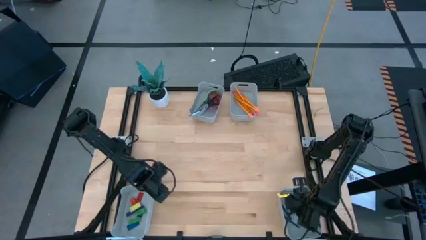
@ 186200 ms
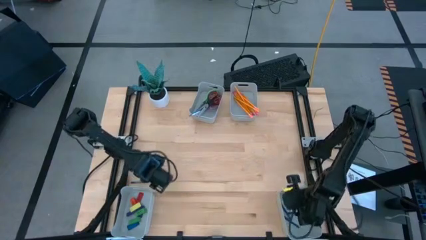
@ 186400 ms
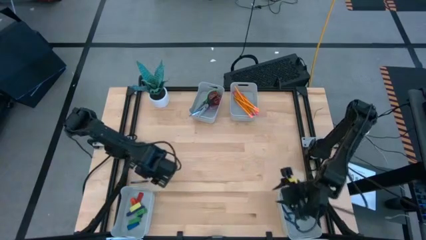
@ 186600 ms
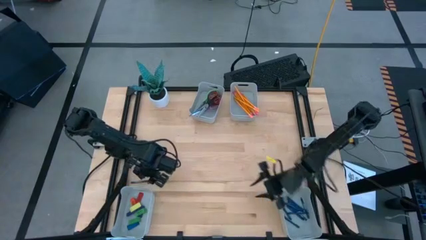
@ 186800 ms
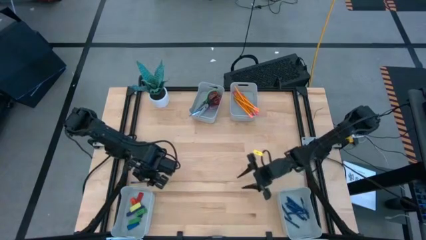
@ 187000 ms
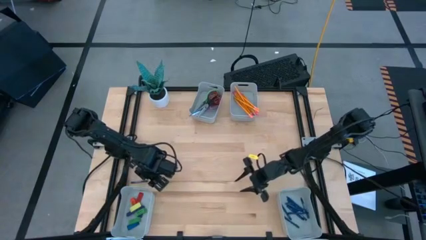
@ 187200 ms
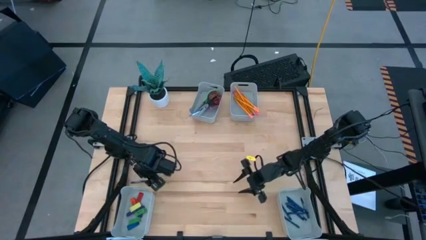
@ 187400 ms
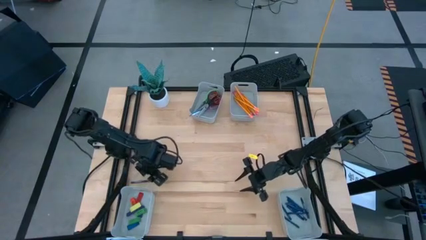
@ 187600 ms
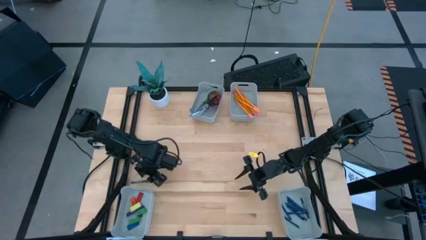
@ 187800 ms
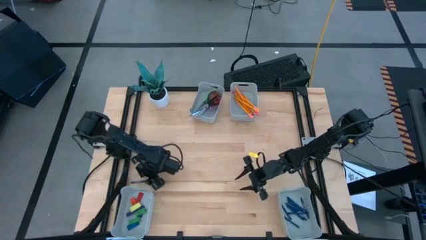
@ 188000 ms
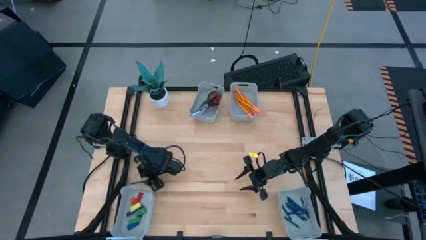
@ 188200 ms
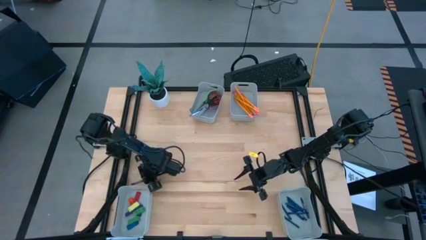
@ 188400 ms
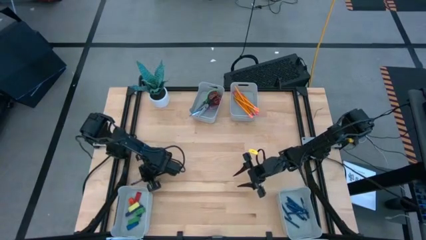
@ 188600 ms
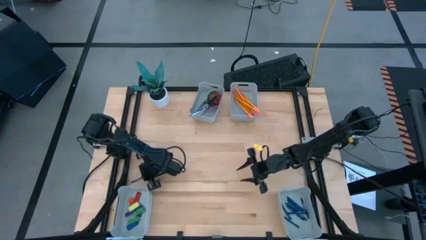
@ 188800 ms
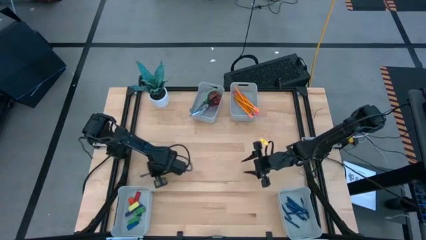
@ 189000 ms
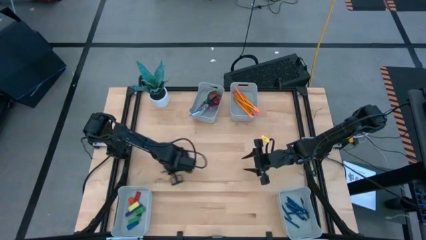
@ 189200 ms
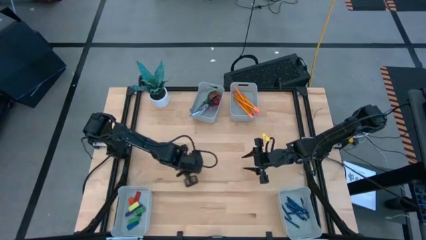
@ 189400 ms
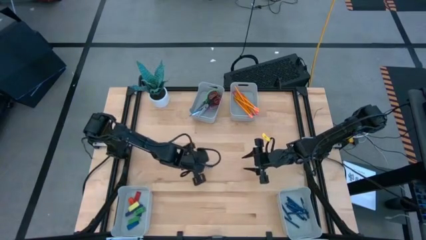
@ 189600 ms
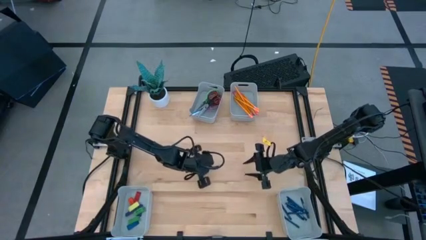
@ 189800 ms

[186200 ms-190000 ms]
Task: Sort crayons/erasers/pens/pencils in bins
Put the blue crayon into the bottom right bin

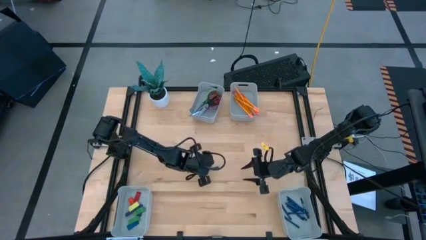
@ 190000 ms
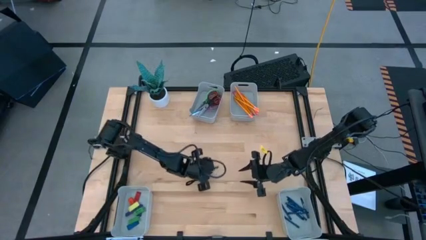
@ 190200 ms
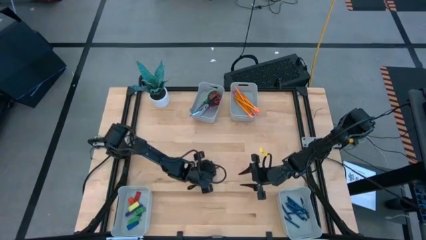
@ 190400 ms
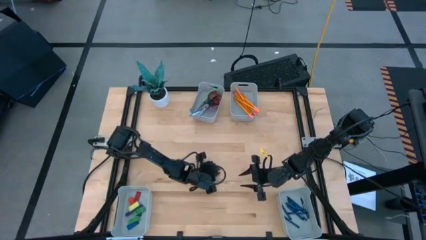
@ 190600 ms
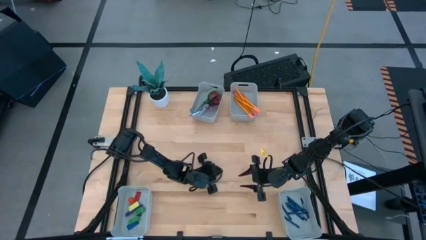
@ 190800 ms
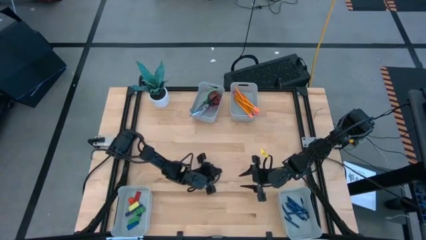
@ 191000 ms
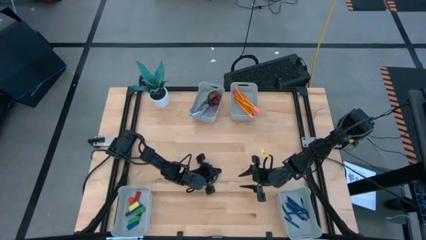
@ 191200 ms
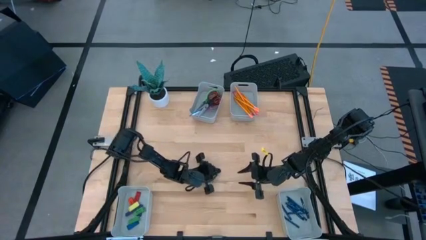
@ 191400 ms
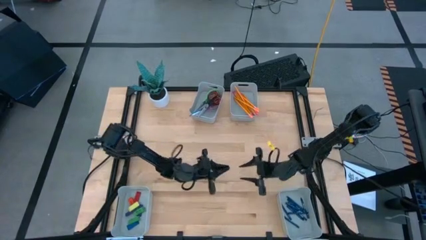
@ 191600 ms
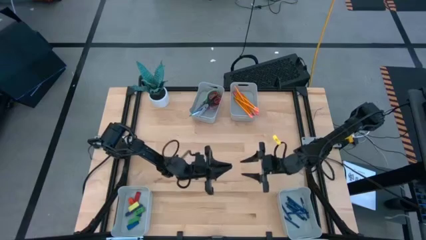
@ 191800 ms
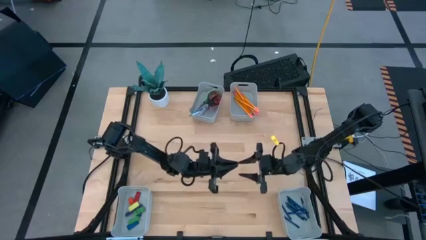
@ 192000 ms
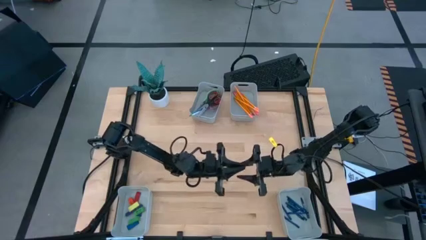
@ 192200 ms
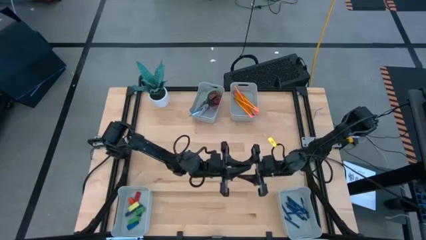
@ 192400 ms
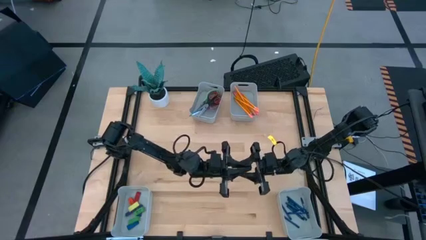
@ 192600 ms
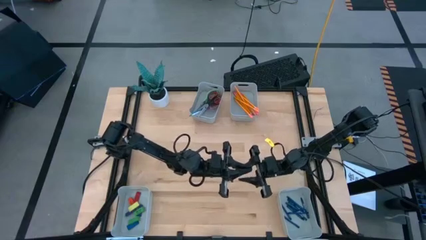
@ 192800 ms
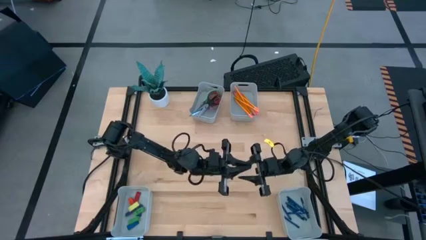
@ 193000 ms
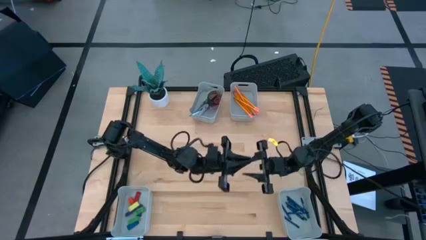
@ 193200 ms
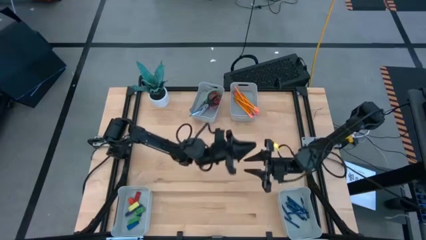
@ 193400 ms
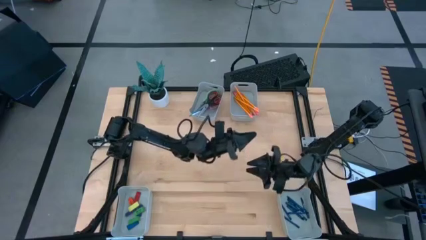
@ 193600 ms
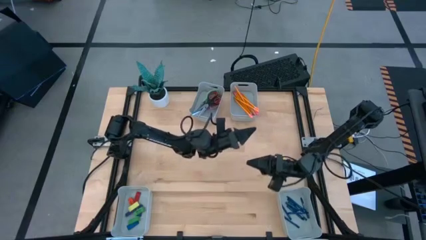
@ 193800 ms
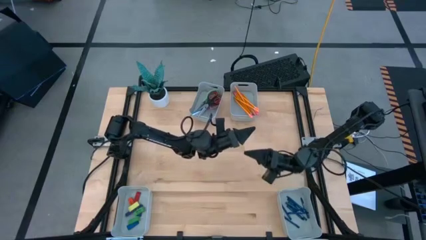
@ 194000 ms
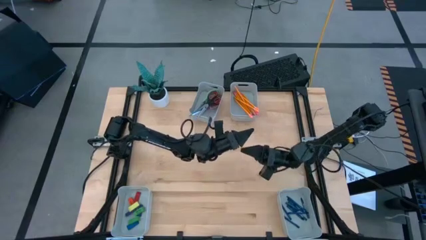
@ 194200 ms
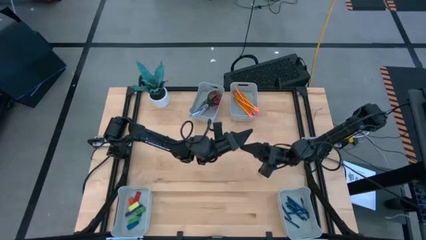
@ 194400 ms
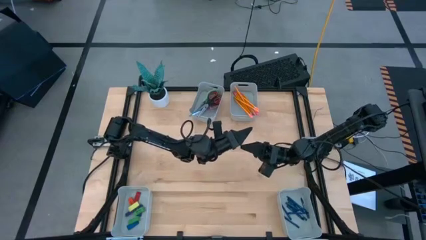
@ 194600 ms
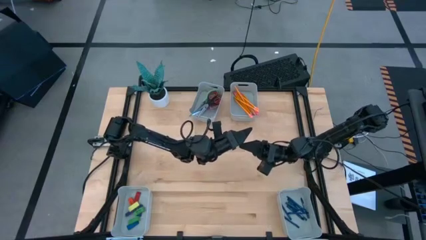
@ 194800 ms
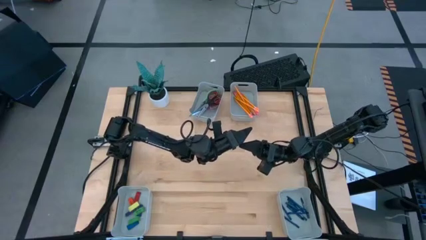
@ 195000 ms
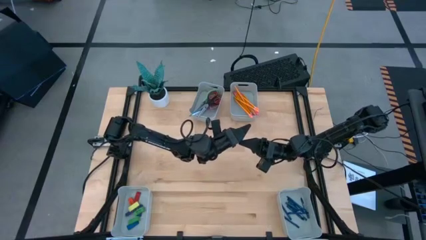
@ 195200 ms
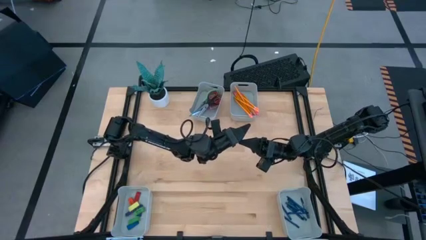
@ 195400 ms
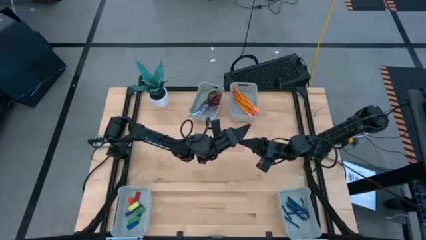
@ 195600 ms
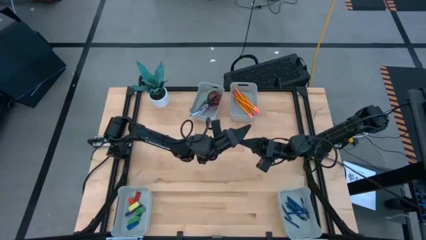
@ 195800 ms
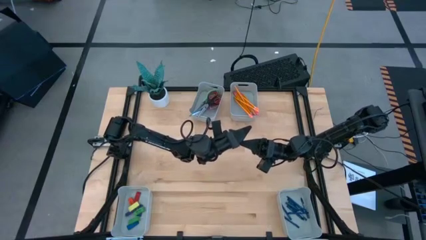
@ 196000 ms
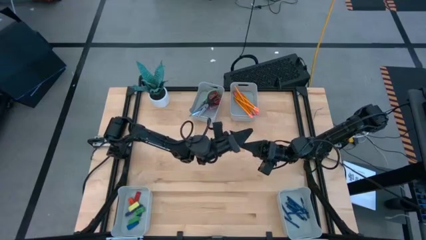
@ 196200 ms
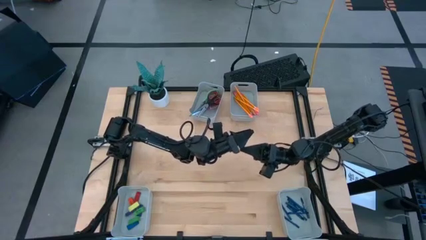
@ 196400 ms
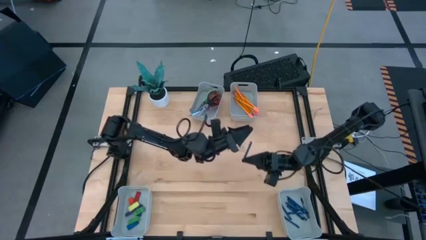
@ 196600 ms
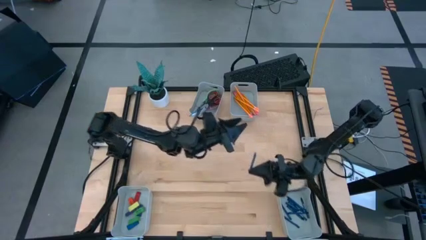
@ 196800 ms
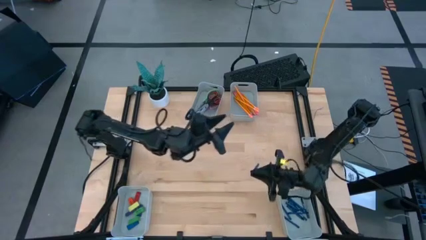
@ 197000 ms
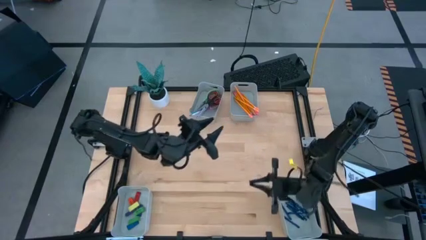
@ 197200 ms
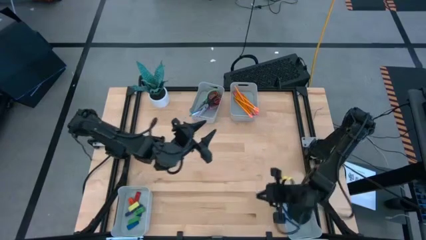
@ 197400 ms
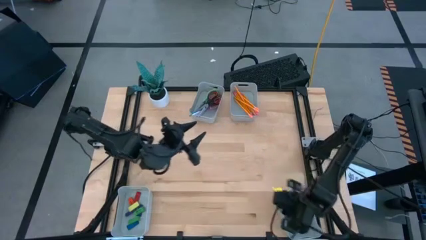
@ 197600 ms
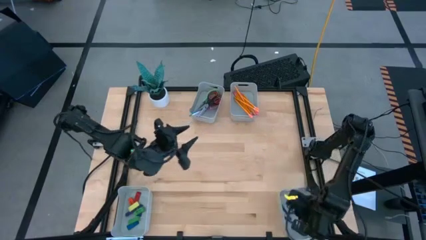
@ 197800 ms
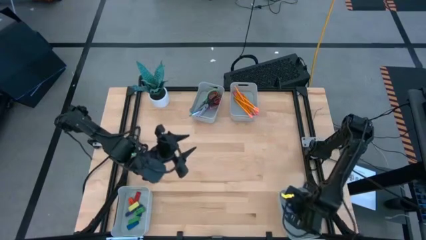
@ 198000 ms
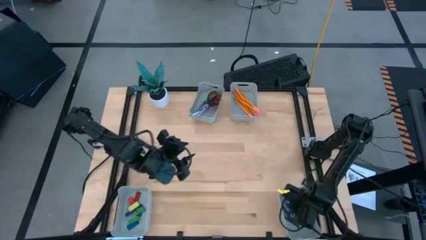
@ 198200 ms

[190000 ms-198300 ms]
Put the blue crayon into the bottom right bin

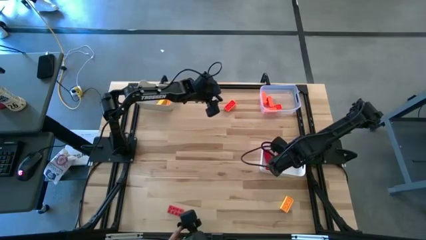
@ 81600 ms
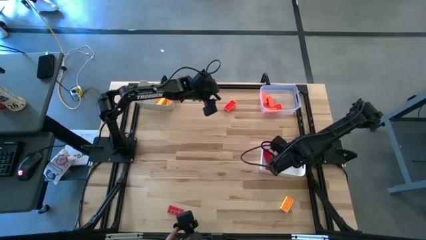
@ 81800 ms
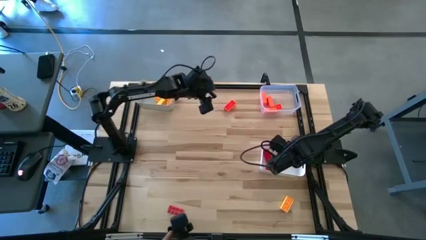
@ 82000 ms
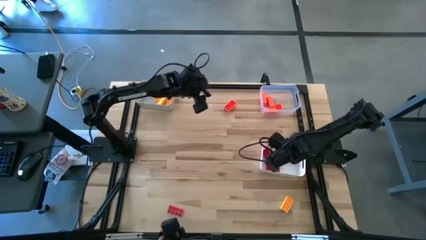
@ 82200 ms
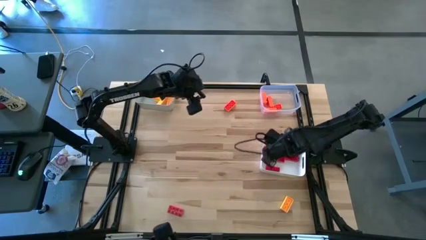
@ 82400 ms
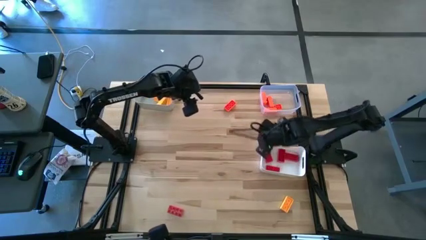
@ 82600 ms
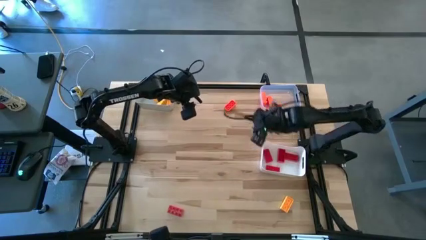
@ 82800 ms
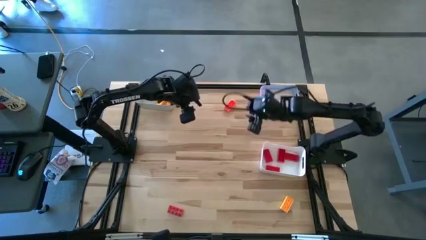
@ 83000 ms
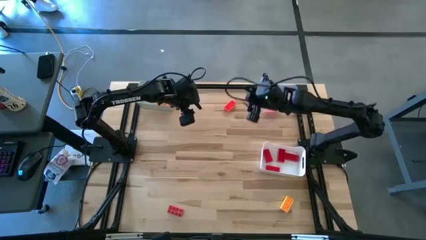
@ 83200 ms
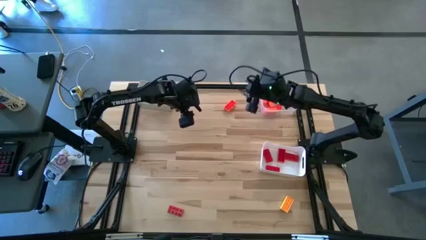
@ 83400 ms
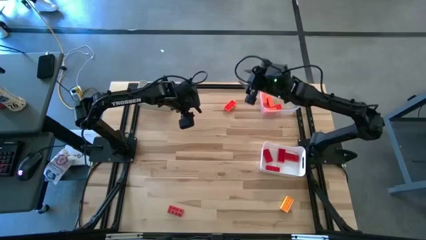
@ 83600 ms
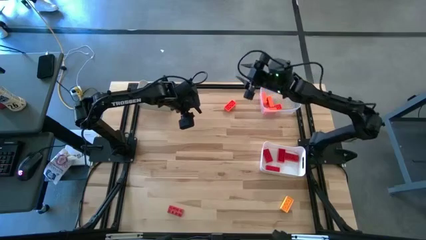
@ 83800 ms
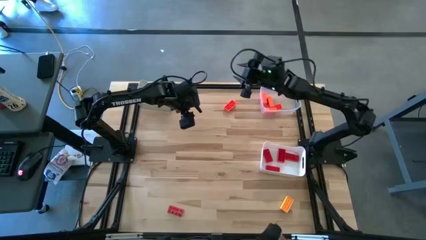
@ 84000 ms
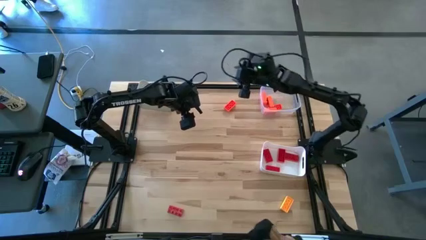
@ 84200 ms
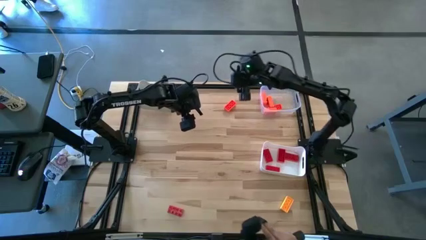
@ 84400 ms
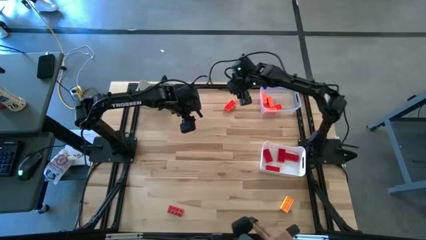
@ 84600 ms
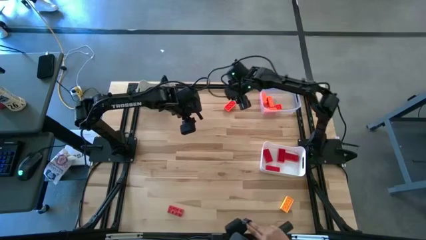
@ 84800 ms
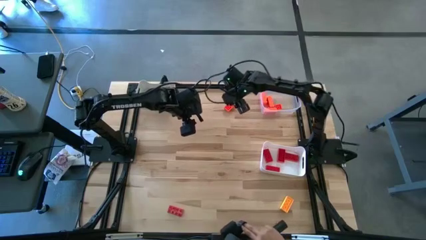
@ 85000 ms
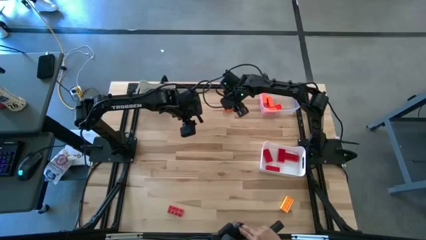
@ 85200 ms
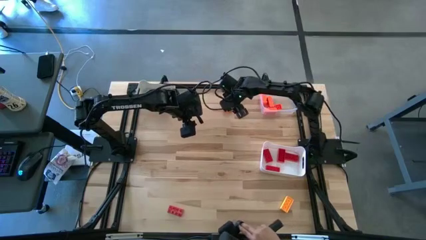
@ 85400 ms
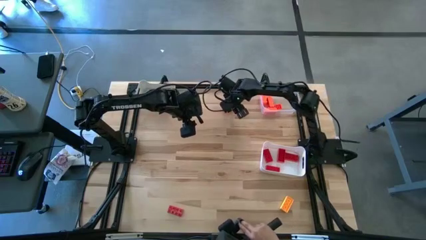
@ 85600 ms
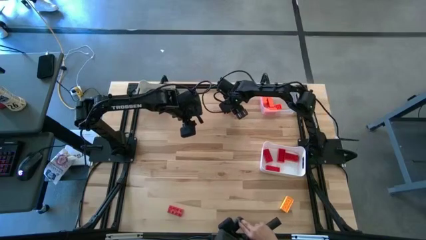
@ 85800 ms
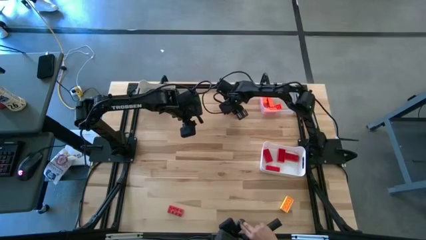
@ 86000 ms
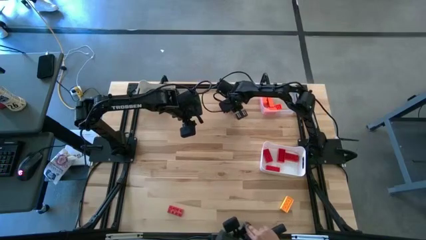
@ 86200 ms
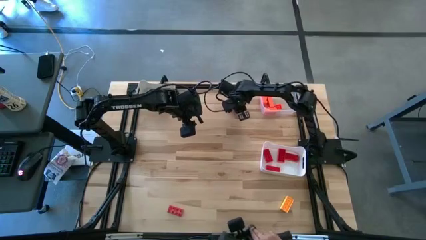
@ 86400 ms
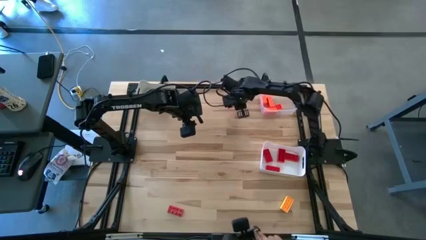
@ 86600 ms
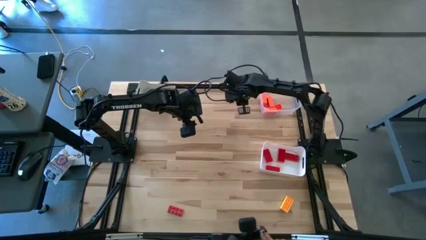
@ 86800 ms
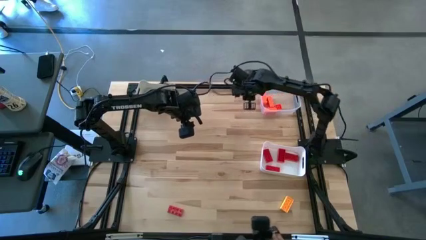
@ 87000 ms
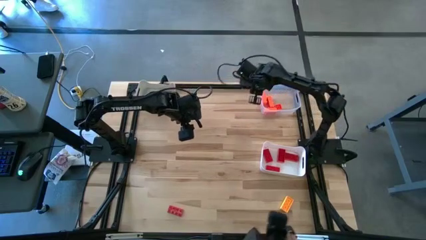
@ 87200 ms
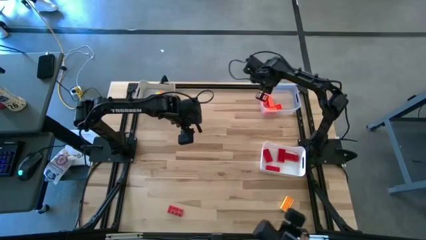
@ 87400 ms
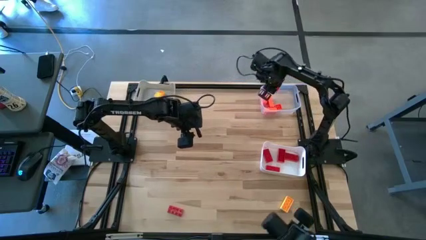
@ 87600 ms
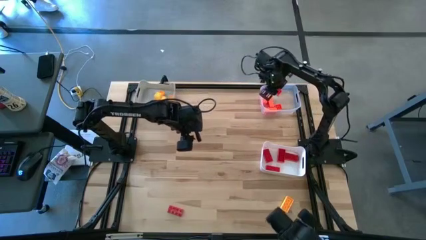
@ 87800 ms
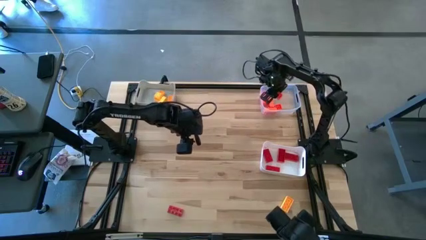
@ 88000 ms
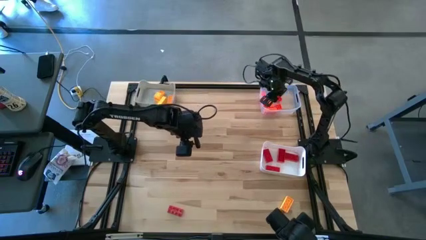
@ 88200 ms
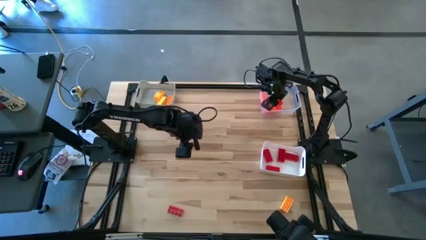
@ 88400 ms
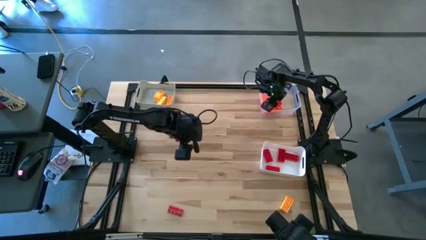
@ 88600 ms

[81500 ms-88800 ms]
Task: Sort & place blocks by color
Put the orange block into the transparent bin
